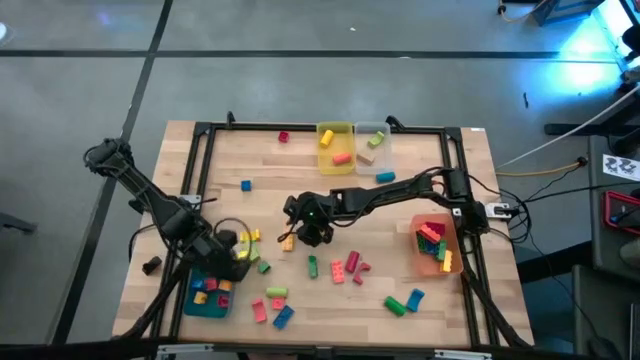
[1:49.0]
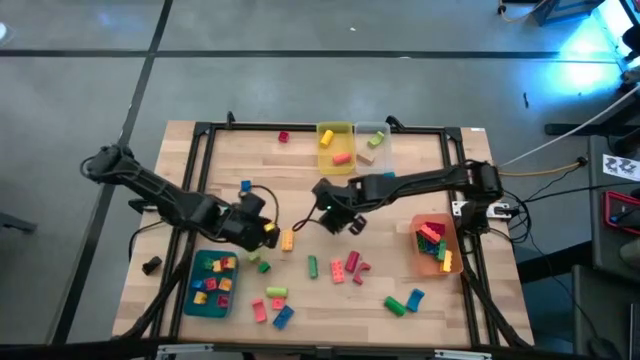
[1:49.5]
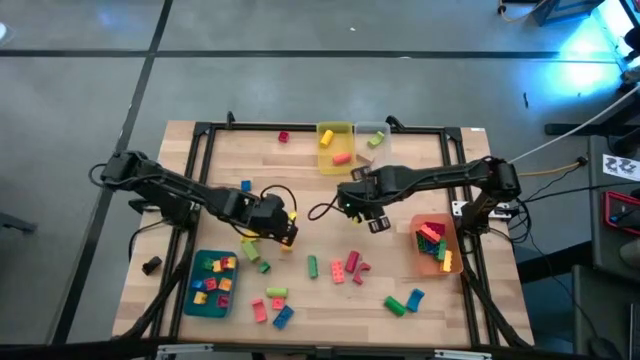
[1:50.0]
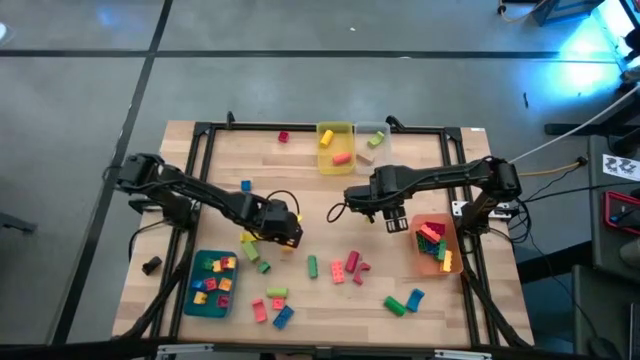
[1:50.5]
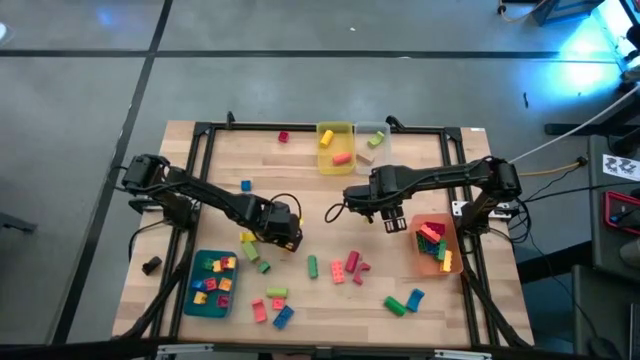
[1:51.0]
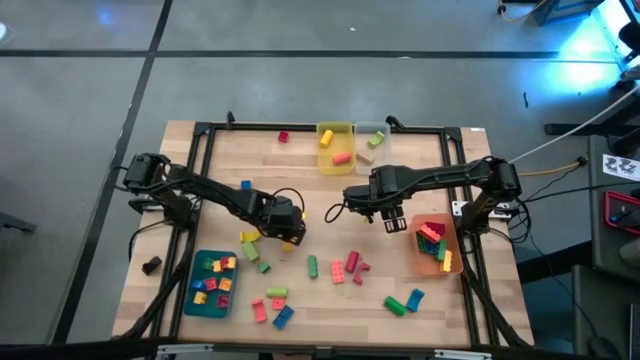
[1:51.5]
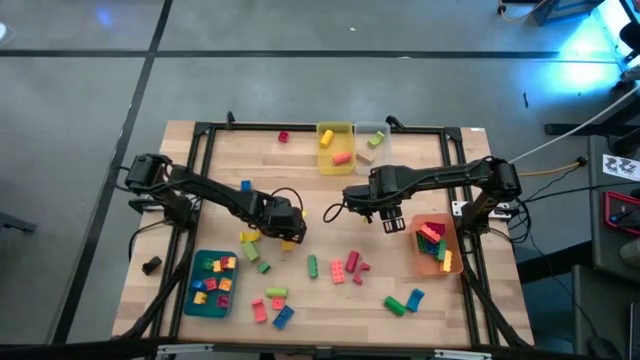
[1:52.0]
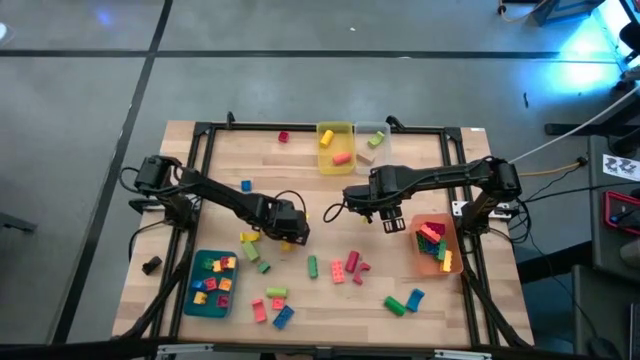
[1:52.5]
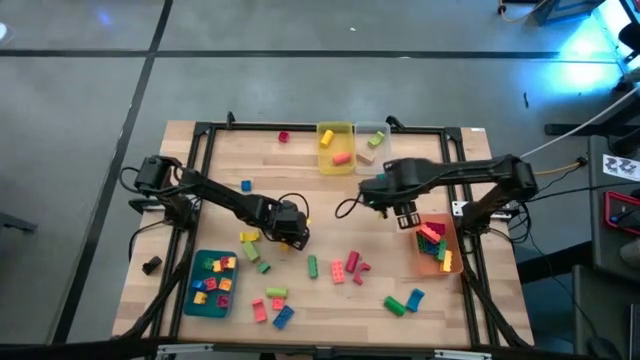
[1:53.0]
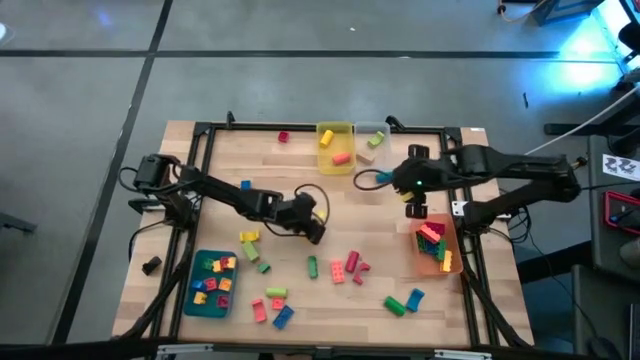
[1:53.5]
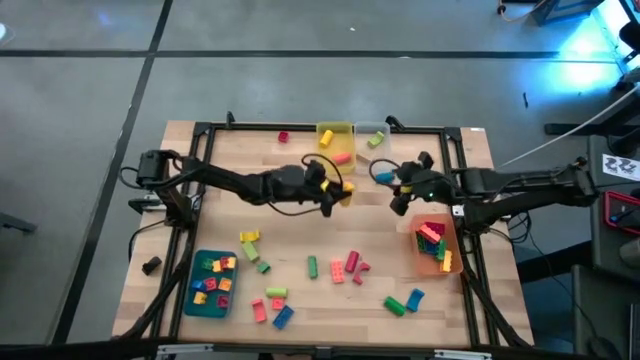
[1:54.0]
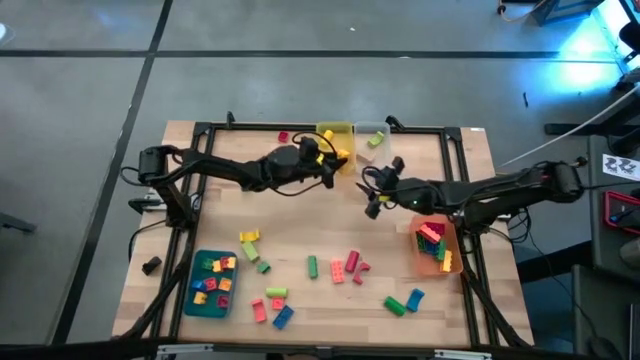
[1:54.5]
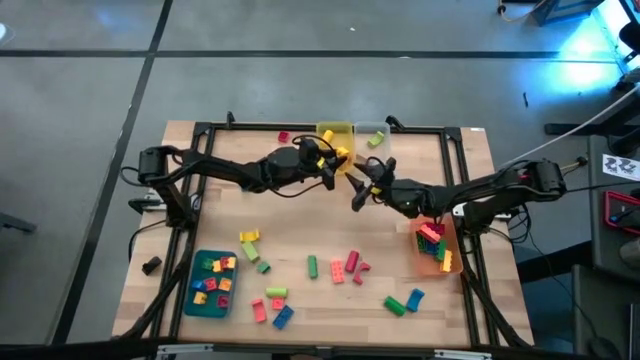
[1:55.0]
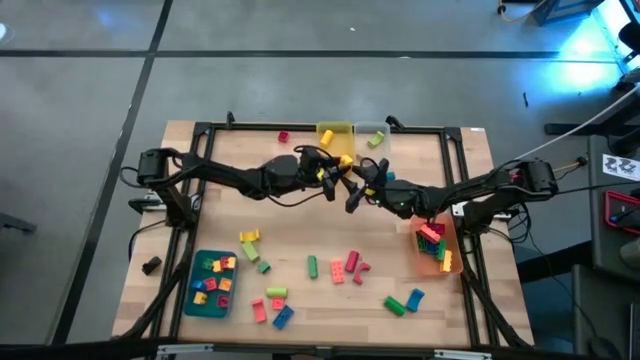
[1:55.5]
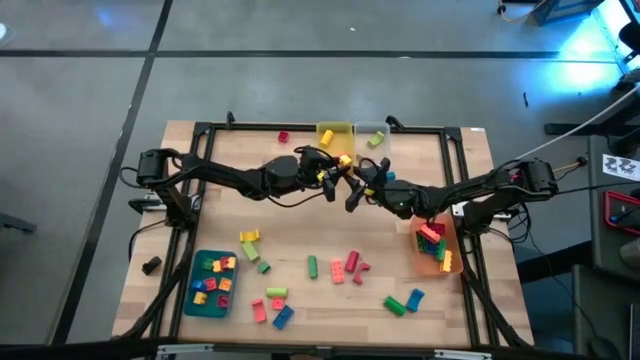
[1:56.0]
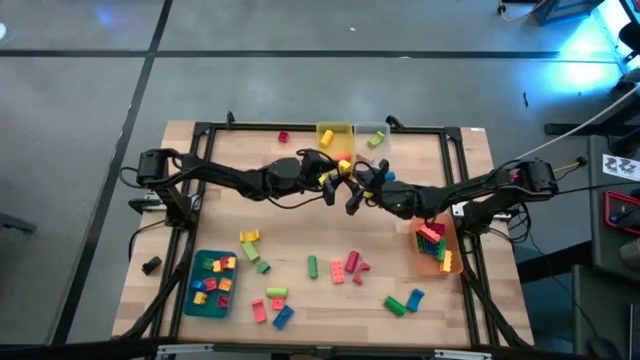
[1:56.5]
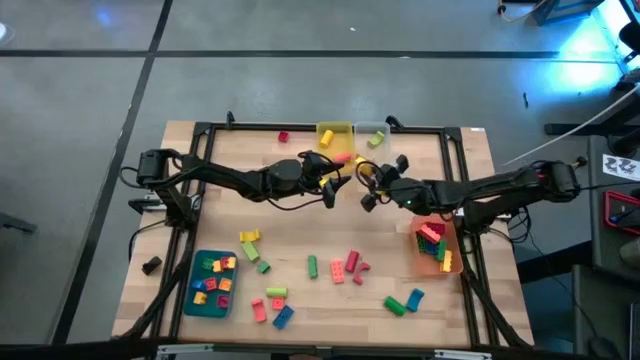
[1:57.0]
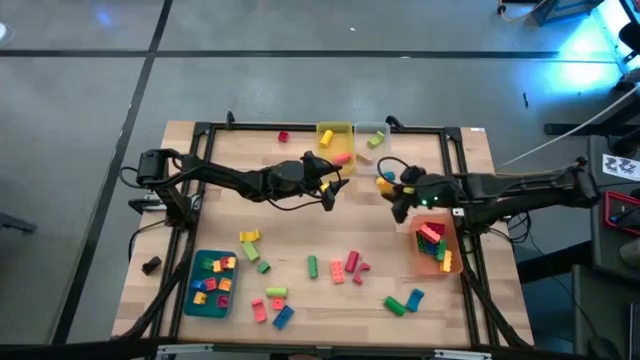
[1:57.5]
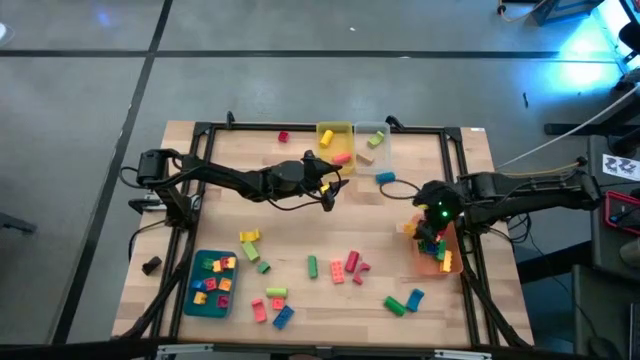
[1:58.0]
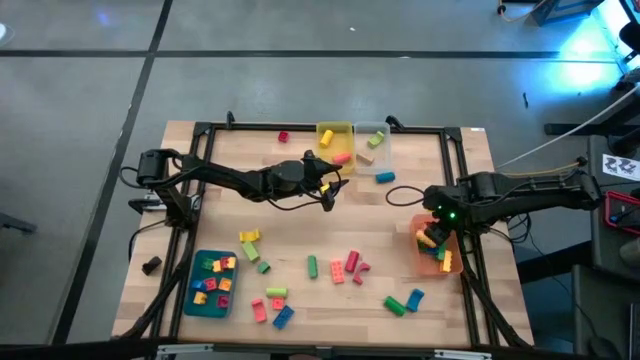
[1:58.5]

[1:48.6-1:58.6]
Task: Sort blocks by size
Put the yellow rectangular game piece into the orange bin

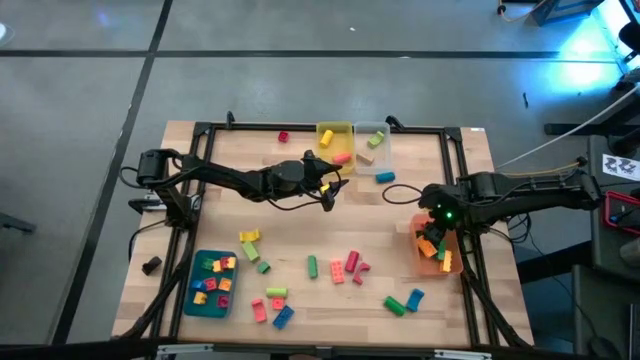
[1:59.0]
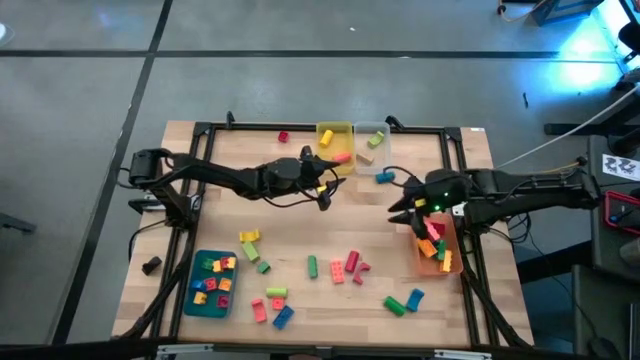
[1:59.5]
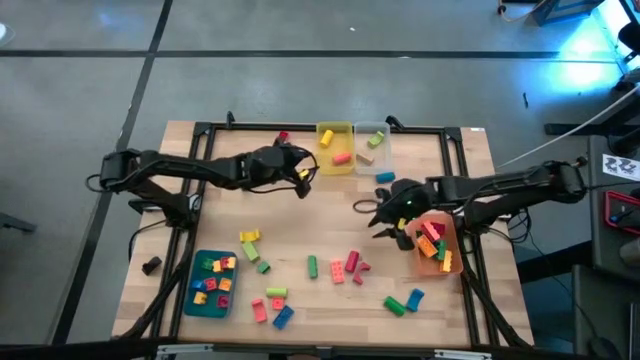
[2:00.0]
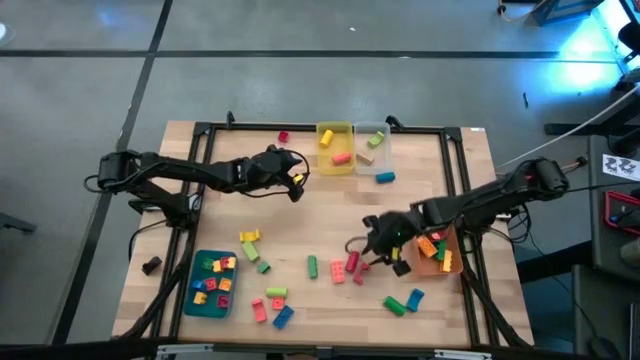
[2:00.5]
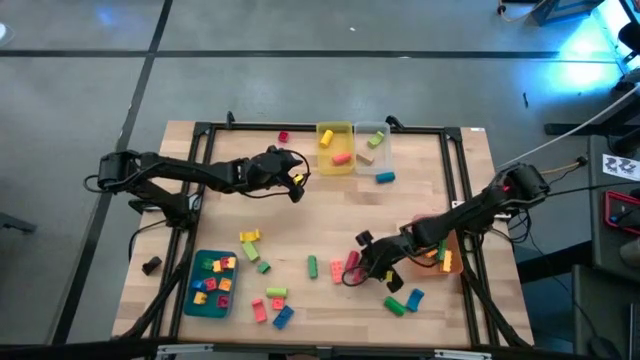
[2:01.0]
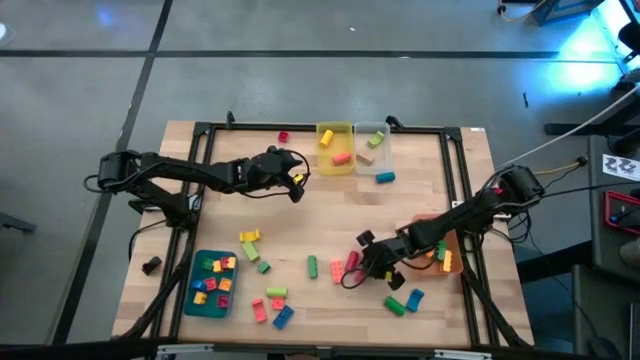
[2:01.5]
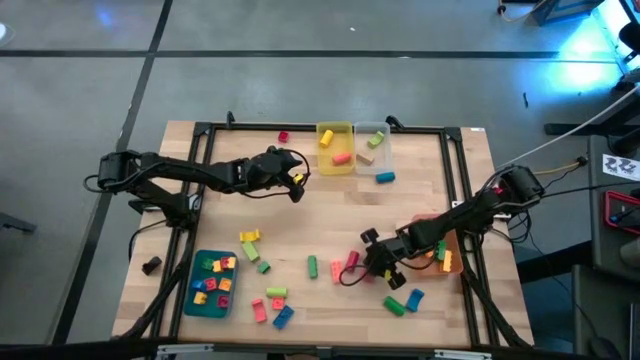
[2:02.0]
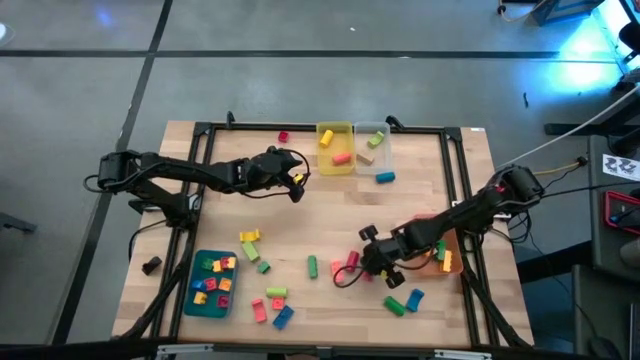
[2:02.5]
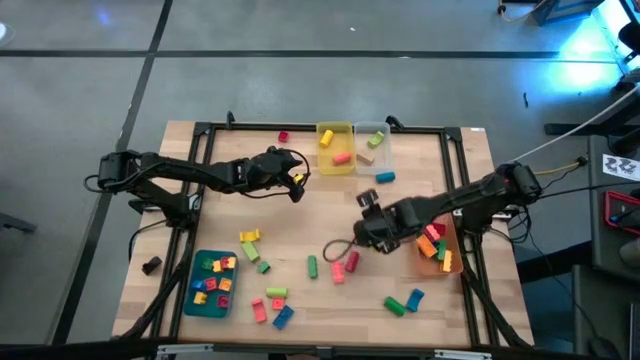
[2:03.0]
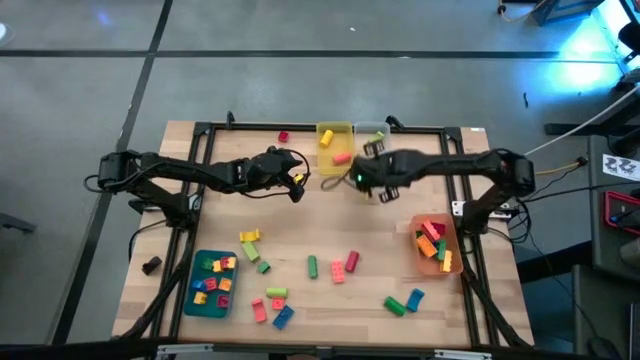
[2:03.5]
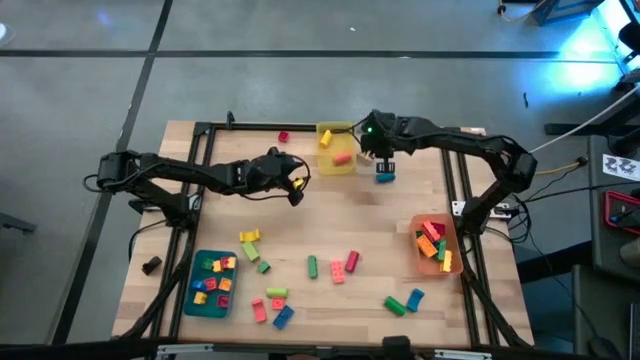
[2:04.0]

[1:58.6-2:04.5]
Put the red arch block into the transparent bin

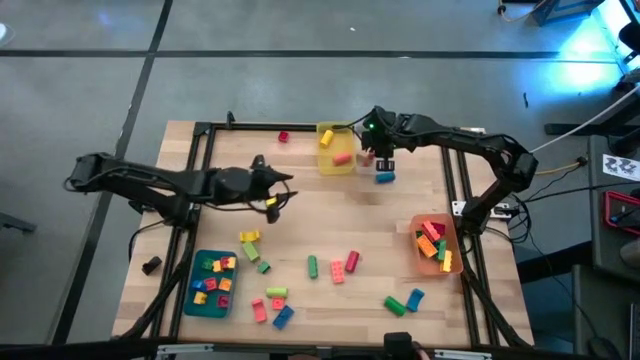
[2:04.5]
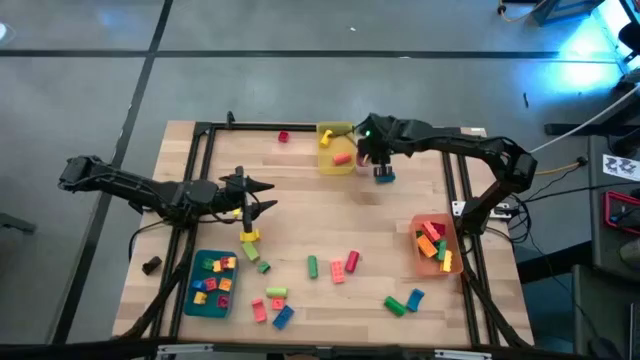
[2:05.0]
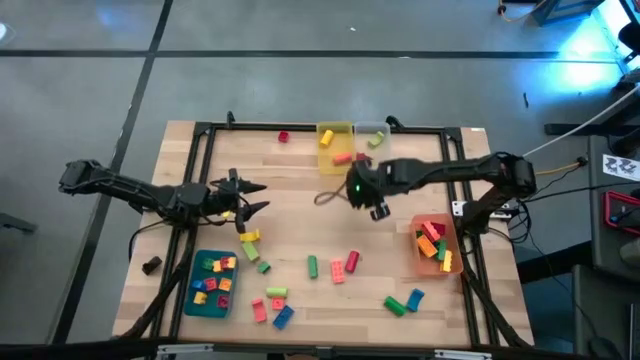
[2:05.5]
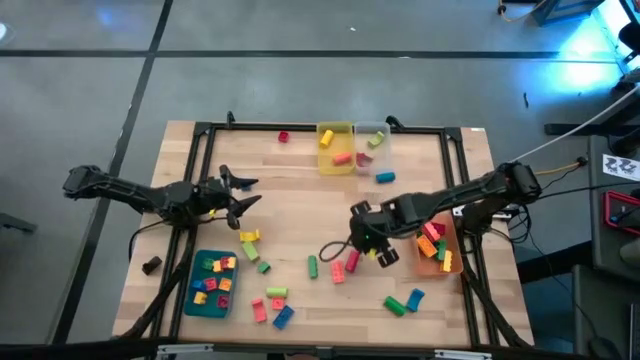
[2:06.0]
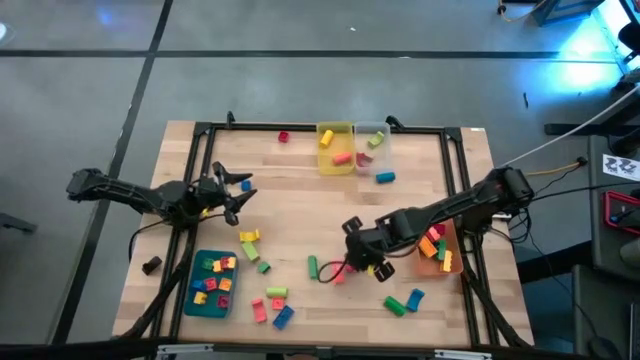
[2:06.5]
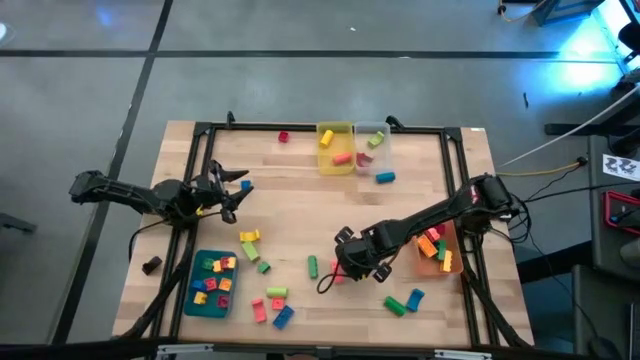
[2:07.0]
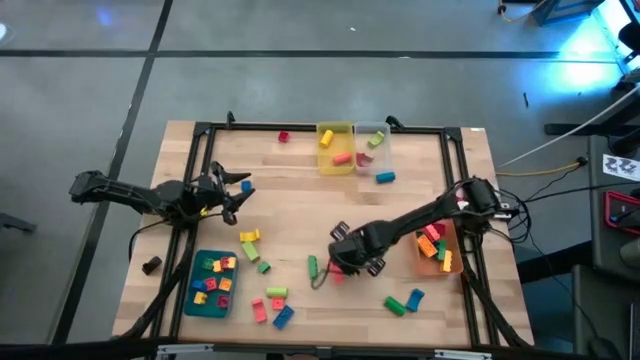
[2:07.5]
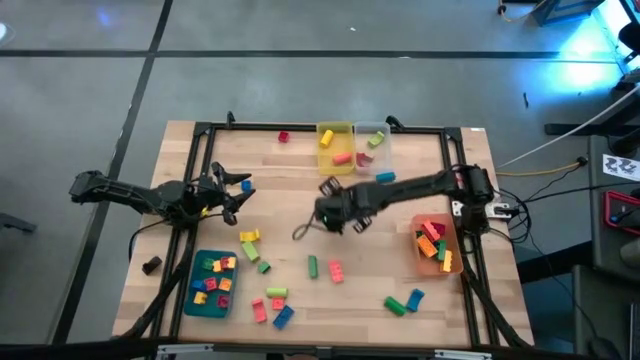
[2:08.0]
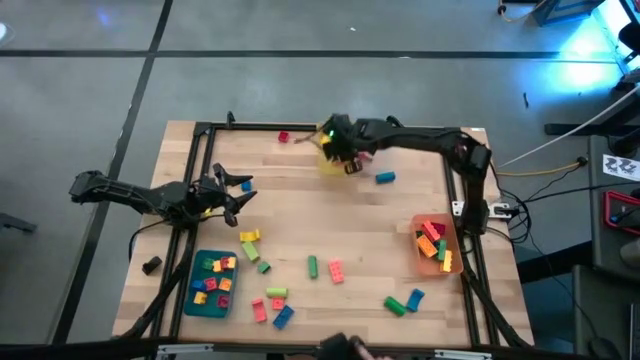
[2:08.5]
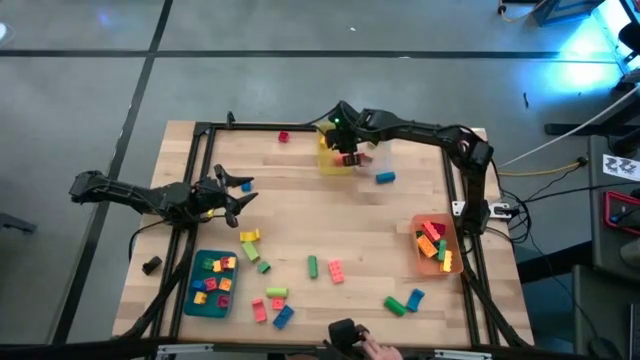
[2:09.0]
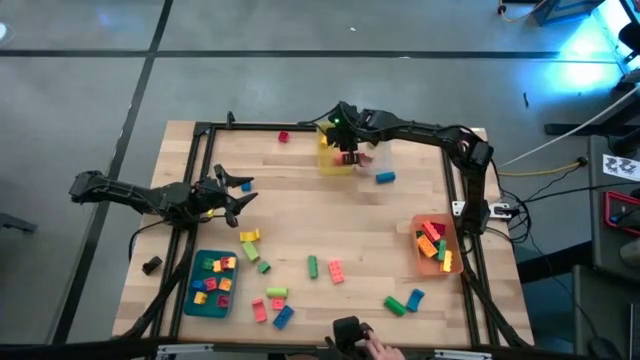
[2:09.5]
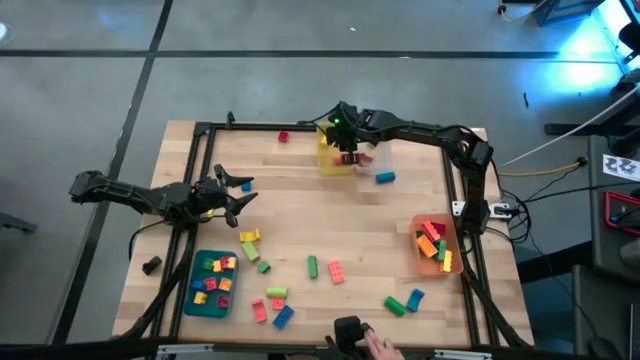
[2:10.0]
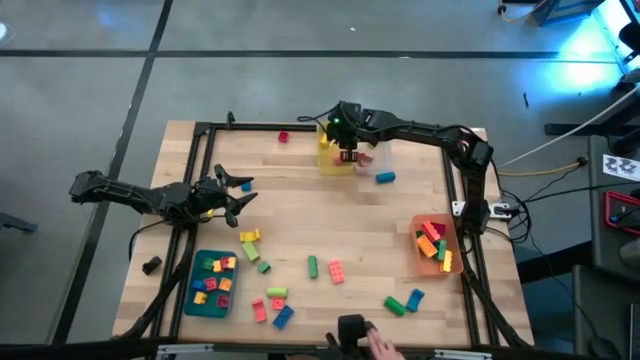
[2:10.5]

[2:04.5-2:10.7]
Put the red cylindrical block into the yellow bin
